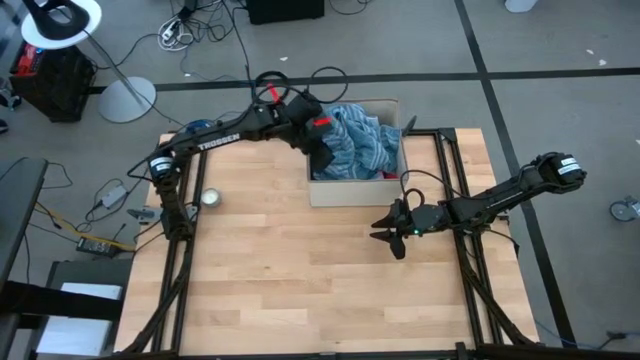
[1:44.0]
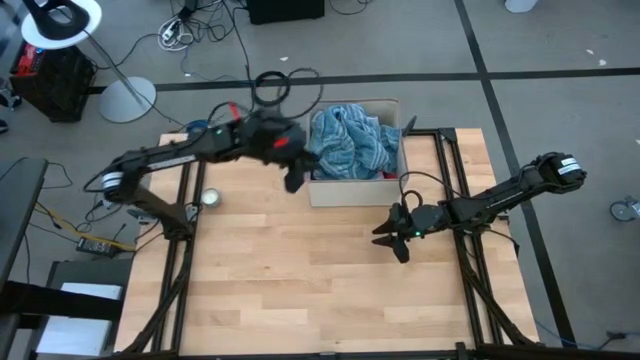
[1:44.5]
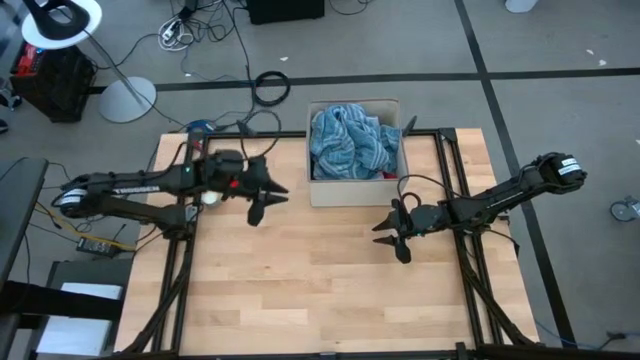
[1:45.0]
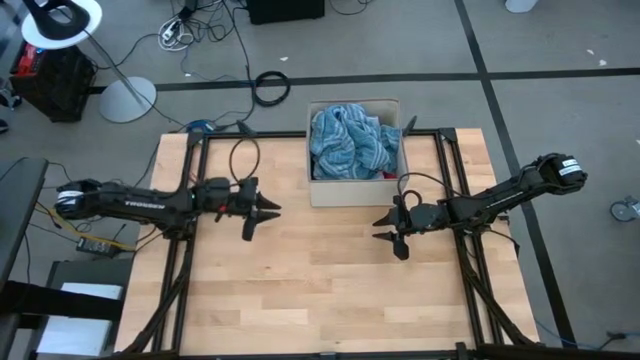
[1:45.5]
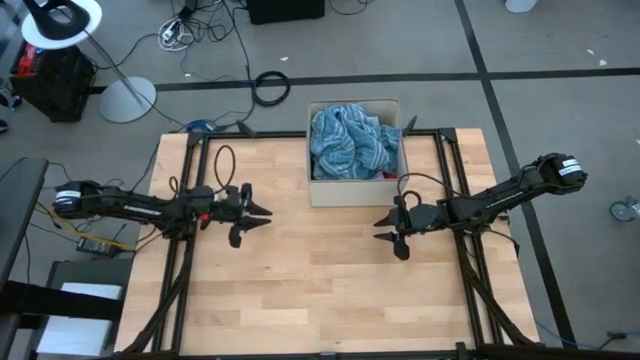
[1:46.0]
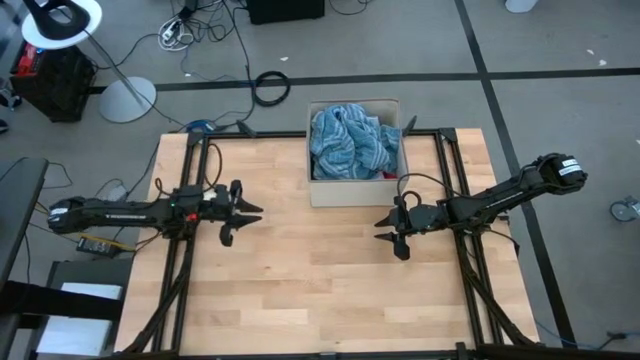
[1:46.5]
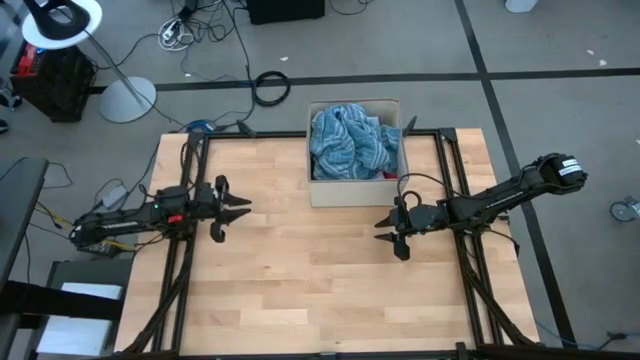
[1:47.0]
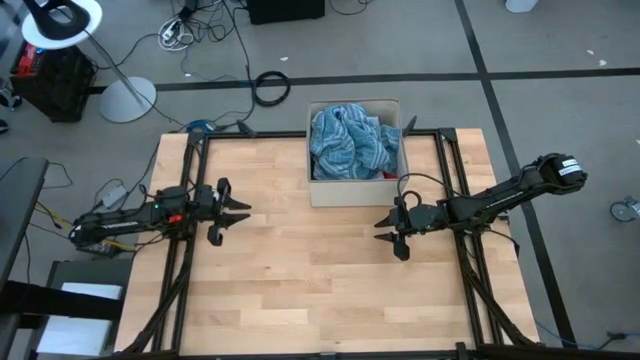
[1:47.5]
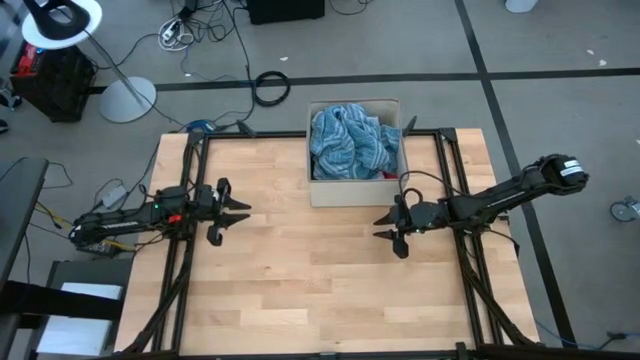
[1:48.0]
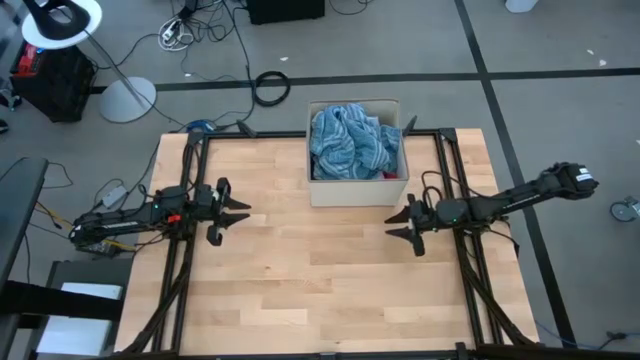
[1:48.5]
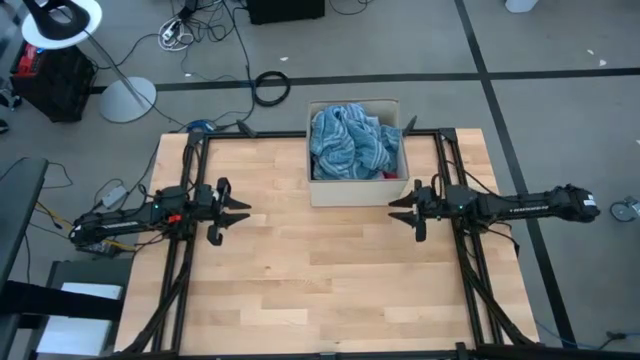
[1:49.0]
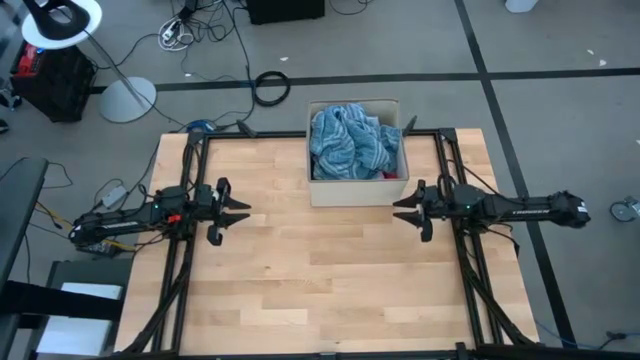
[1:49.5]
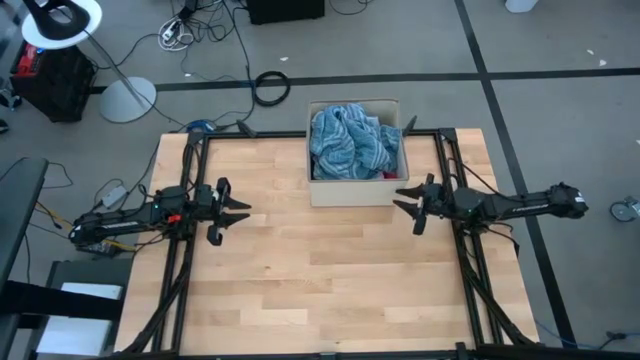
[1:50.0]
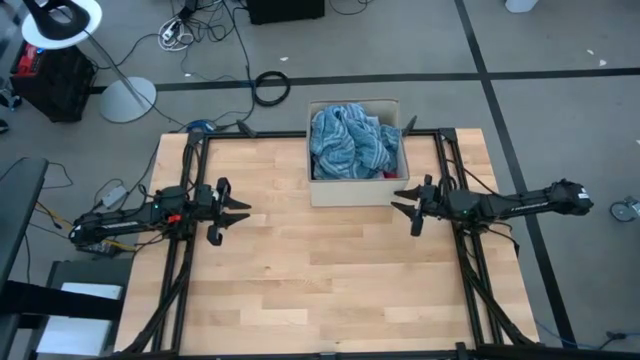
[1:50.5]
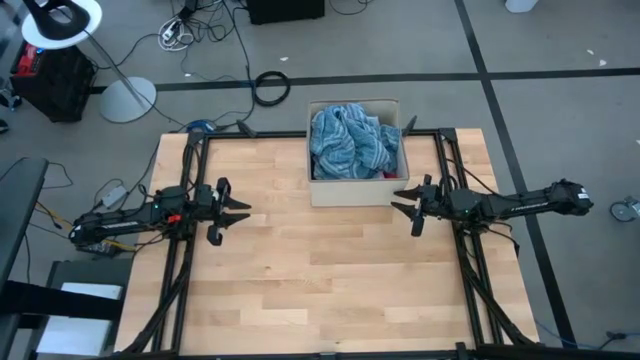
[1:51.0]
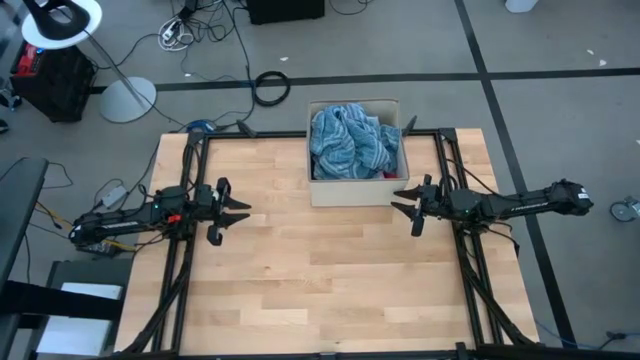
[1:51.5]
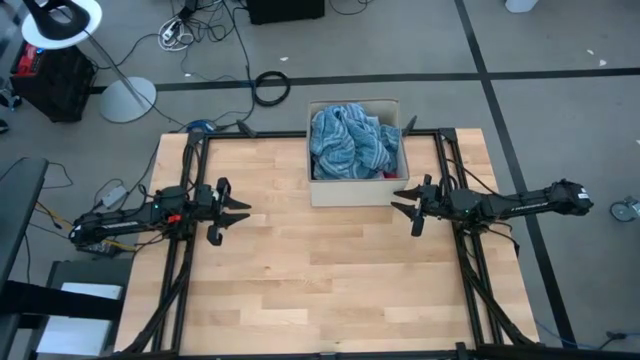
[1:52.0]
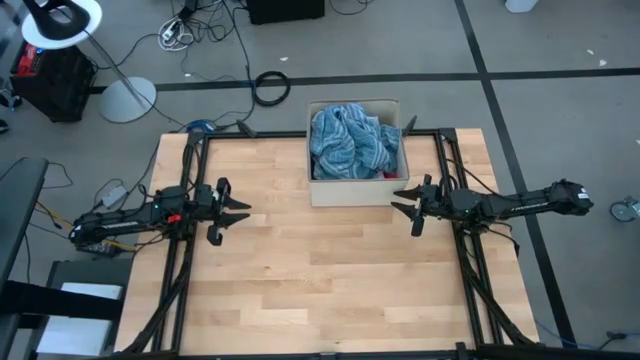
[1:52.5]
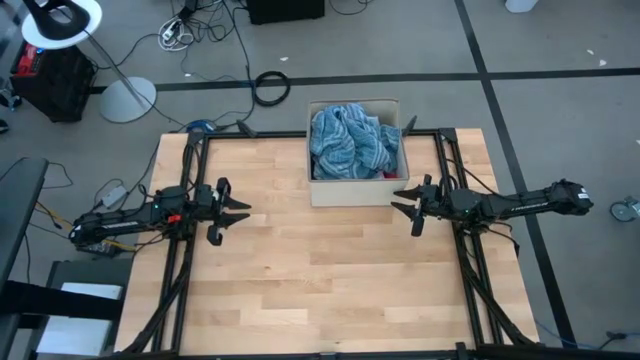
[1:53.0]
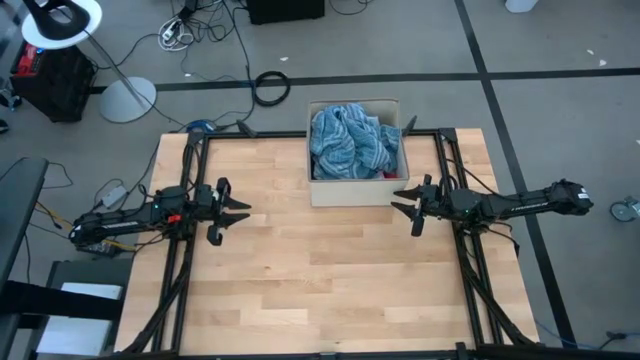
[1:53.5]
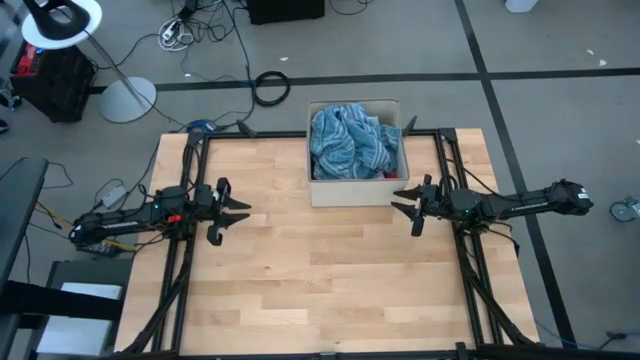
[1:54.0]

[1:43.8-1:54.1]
Task: Sort clothes
Return to Home Position

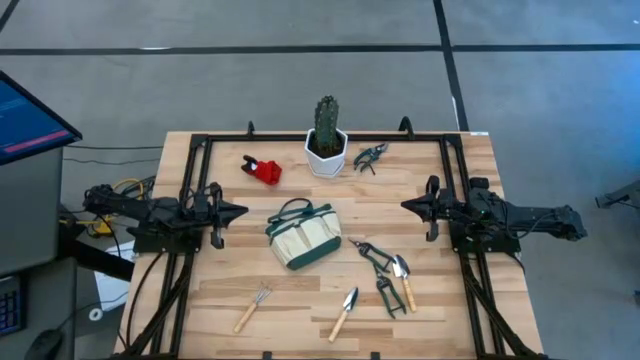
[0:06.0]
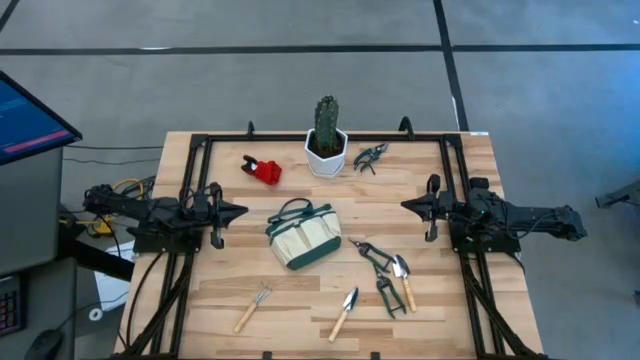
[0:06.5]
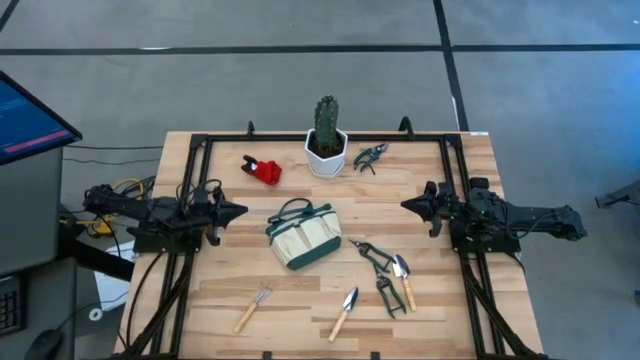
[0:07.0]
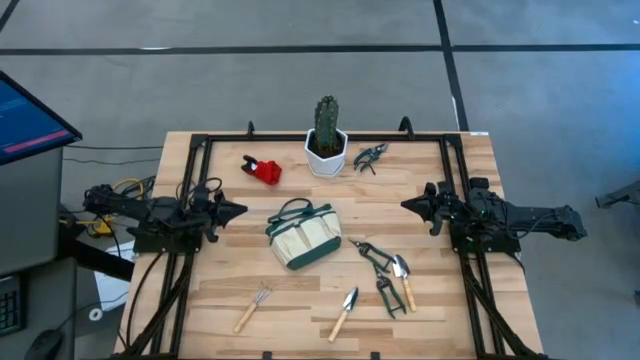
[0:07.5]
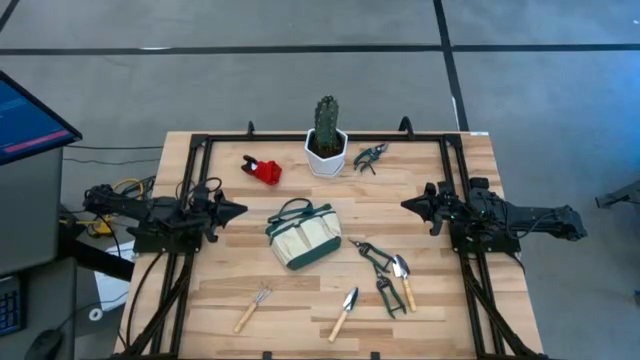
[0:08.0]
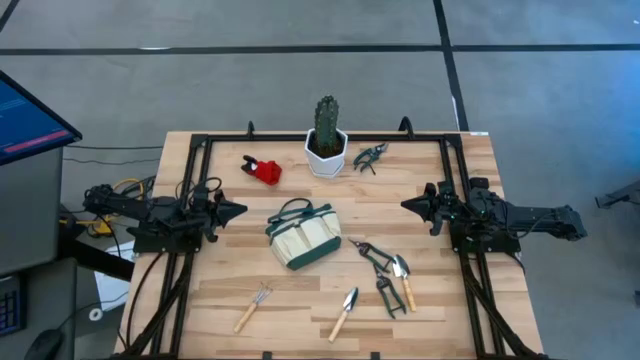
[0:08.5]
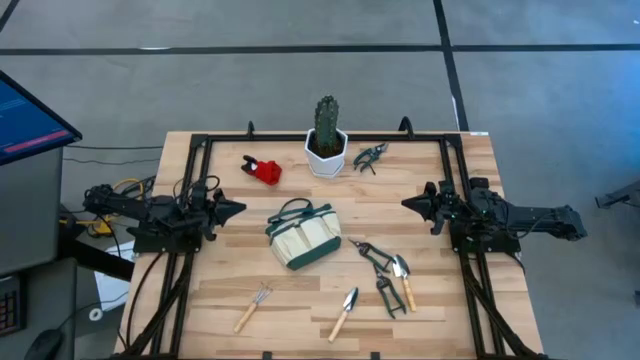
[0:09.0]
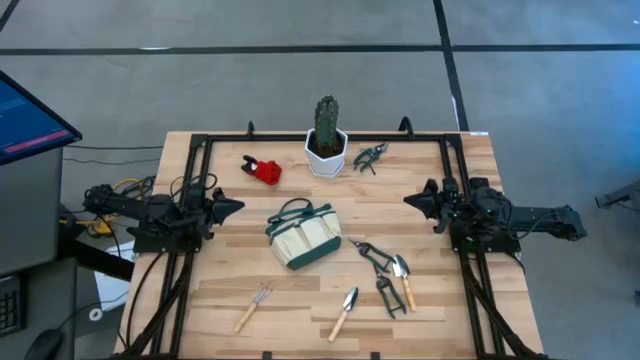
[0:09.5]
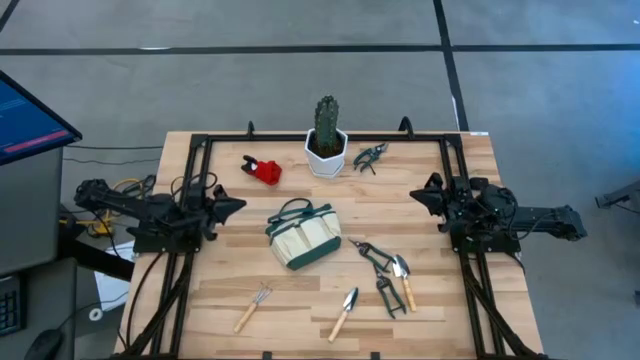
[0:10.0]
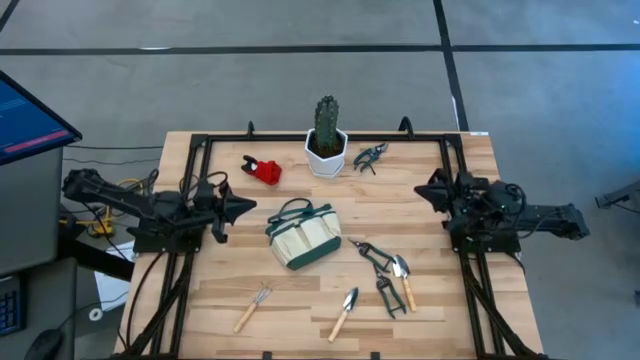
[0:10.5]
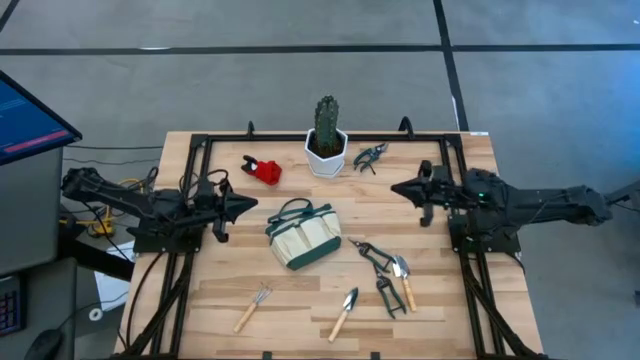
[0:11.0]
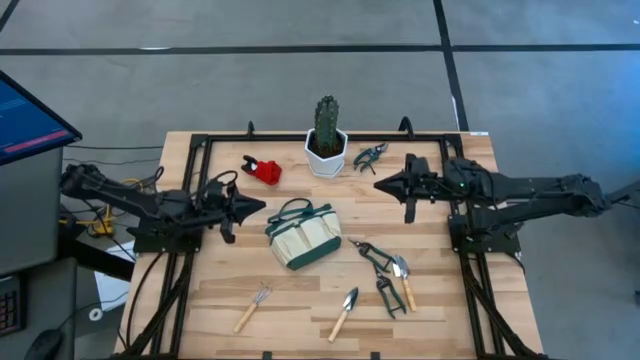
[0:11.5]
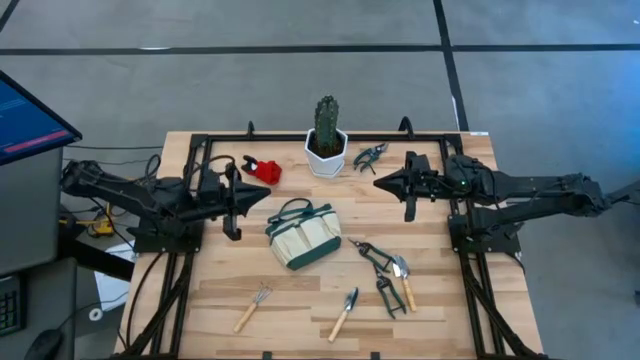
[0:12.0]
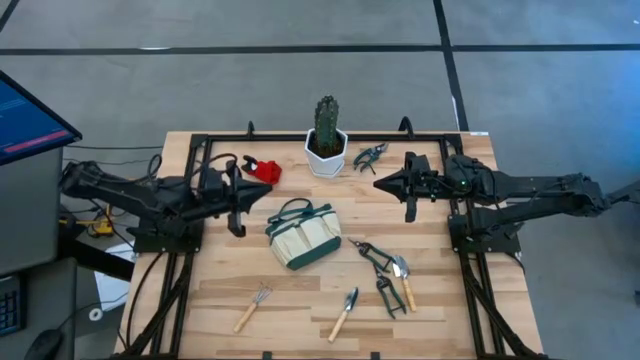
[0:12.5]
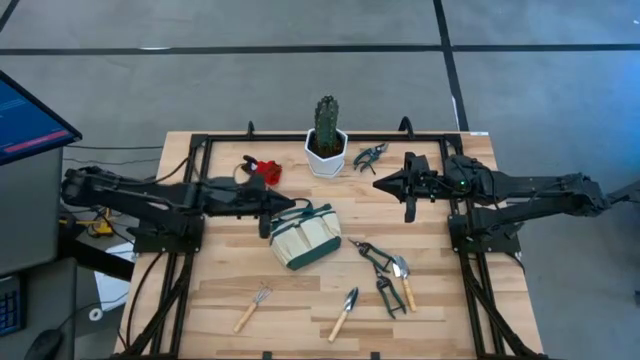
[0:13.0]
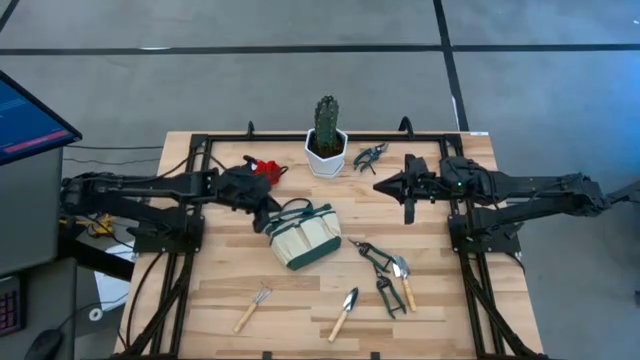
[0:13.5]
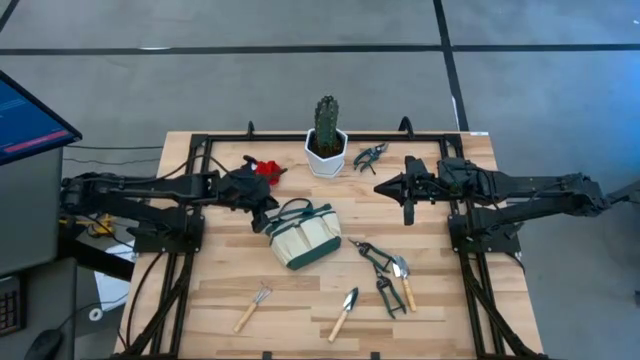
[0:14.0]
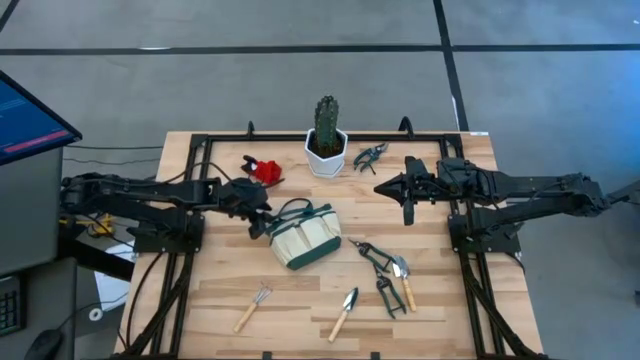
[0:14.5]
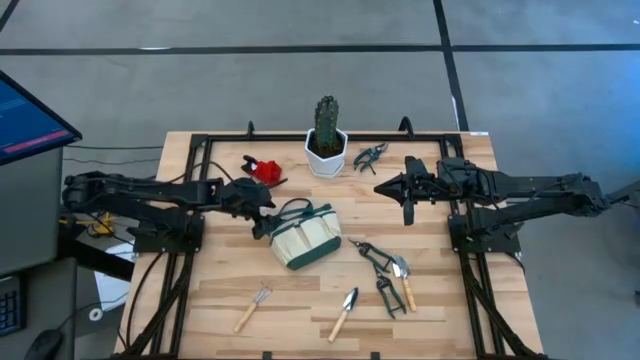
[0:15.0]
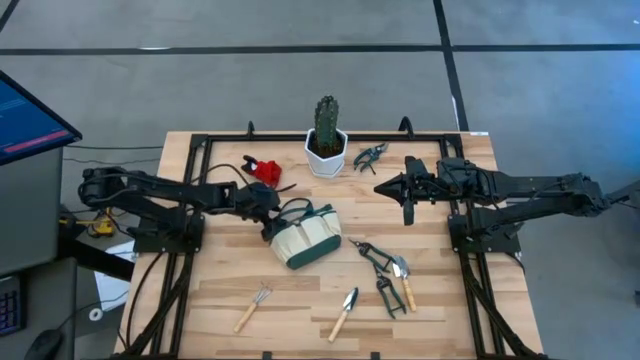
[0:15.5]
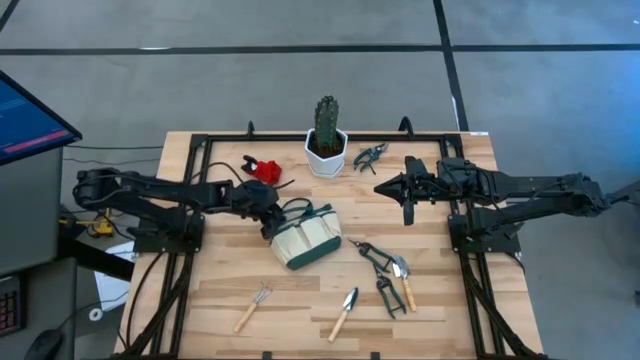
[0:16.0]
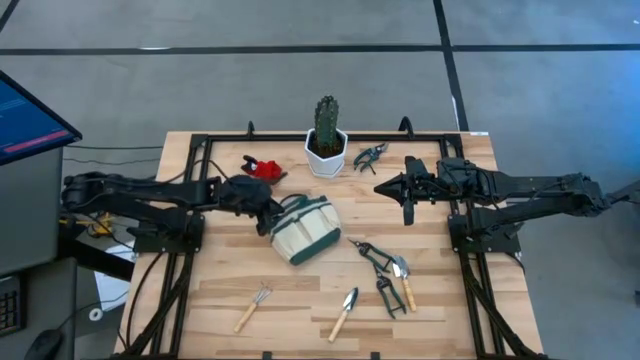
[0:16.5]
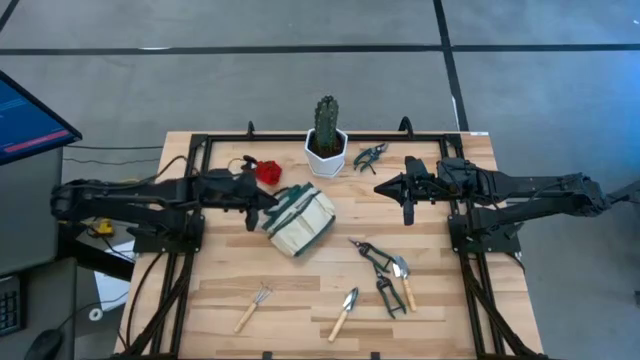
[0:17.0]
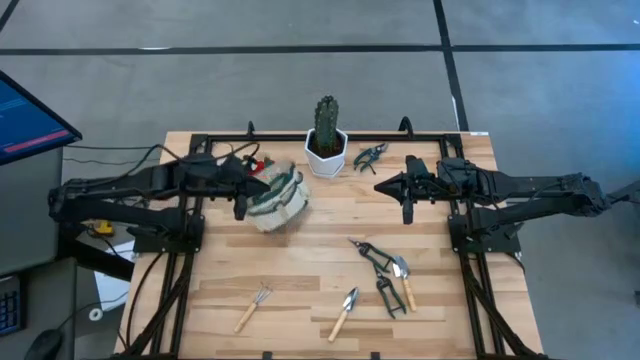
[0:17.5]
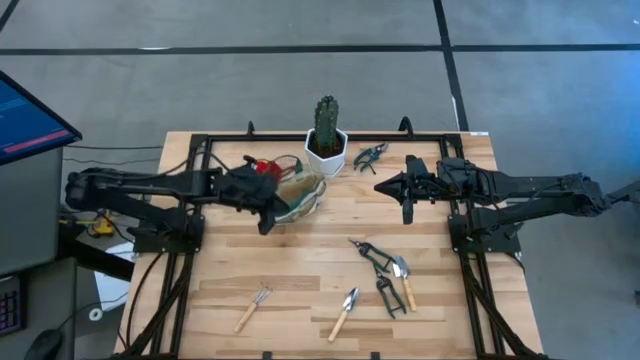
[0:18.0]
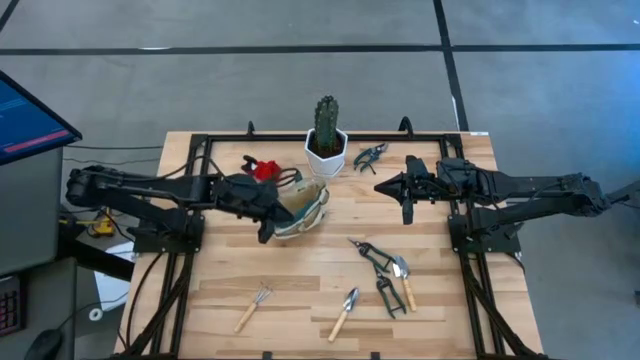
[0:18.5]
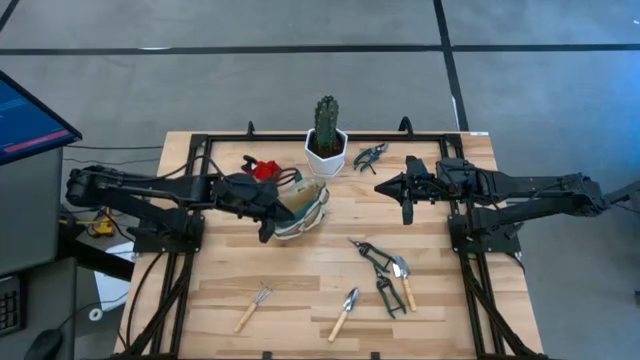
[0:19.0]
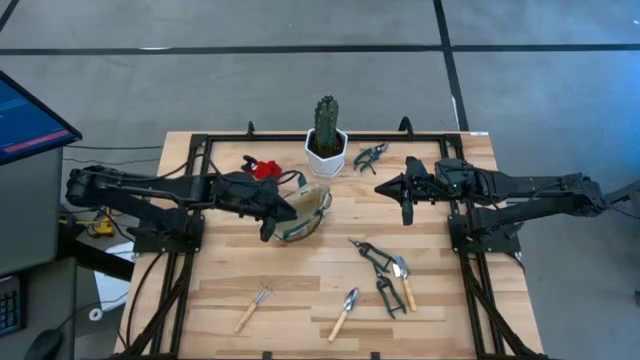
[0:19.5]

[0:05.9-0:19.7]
Task: Pick & Place Garden tools in Gardening bag
Prepare the gardening bag
